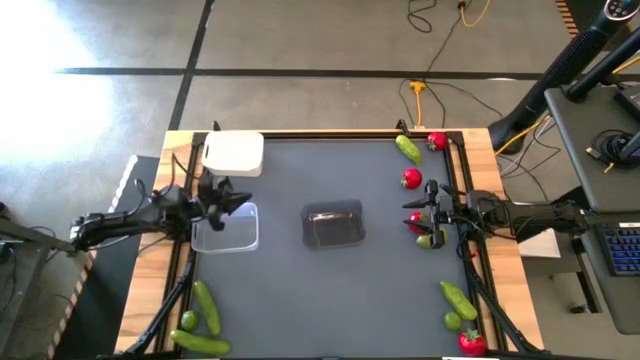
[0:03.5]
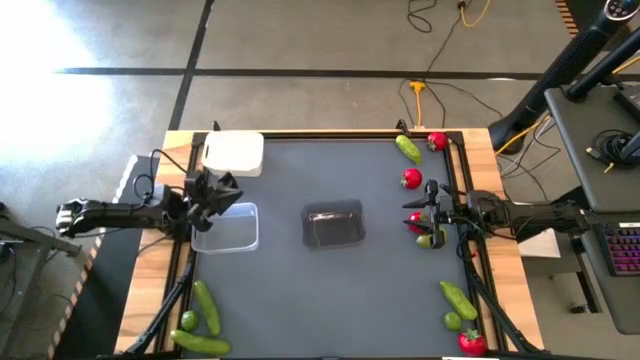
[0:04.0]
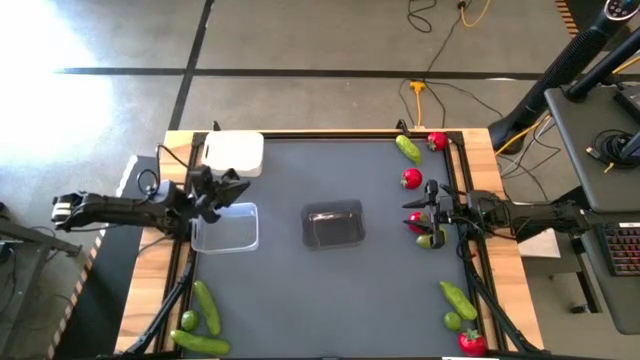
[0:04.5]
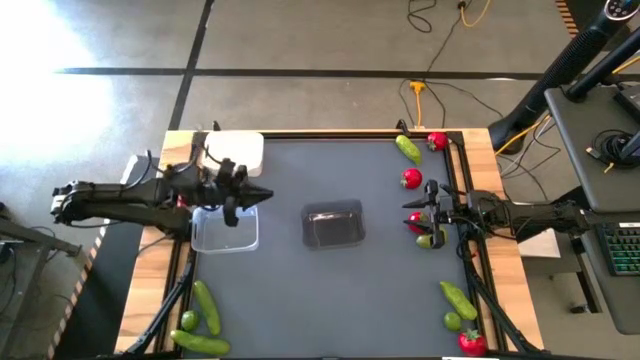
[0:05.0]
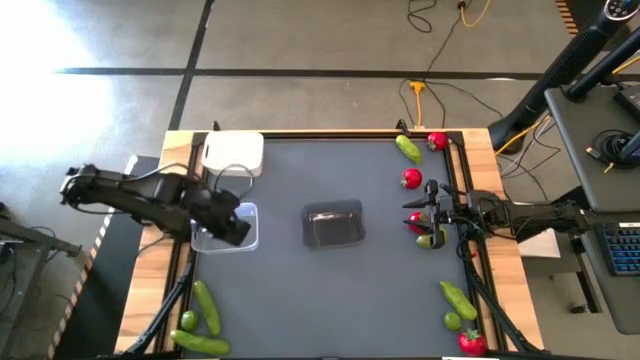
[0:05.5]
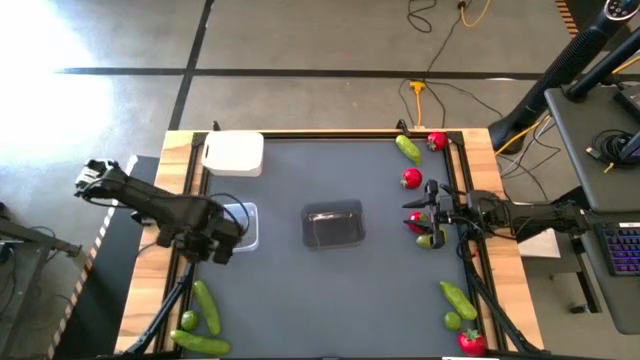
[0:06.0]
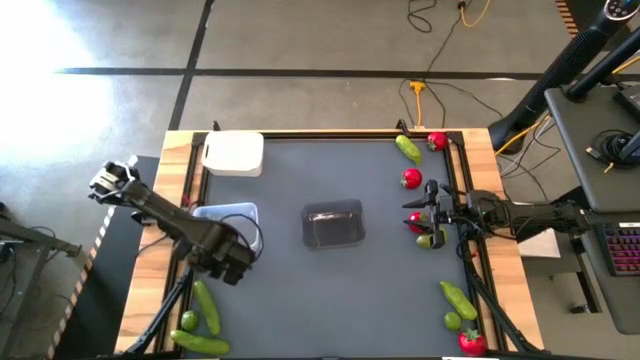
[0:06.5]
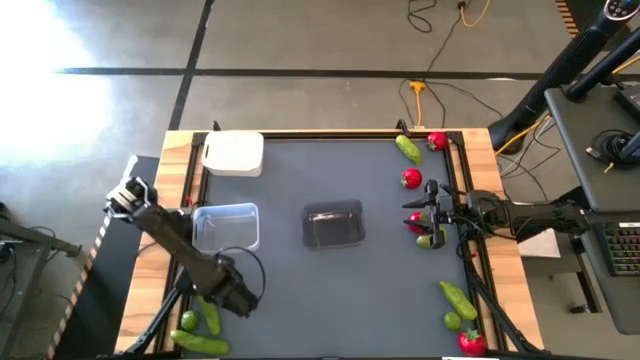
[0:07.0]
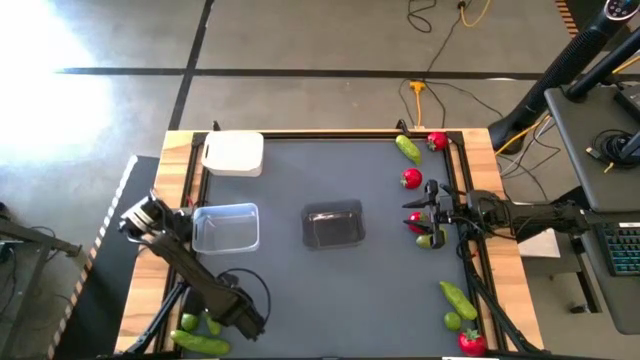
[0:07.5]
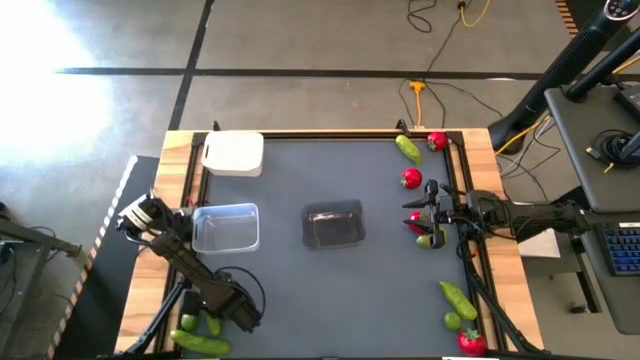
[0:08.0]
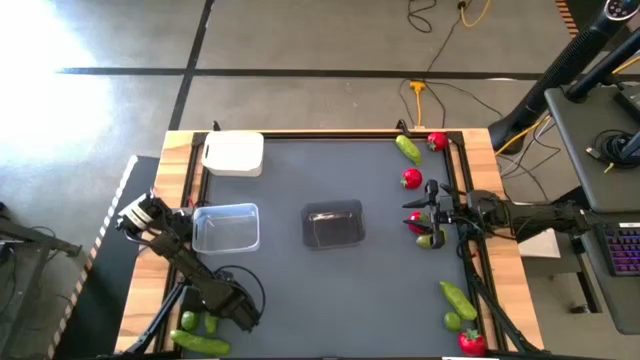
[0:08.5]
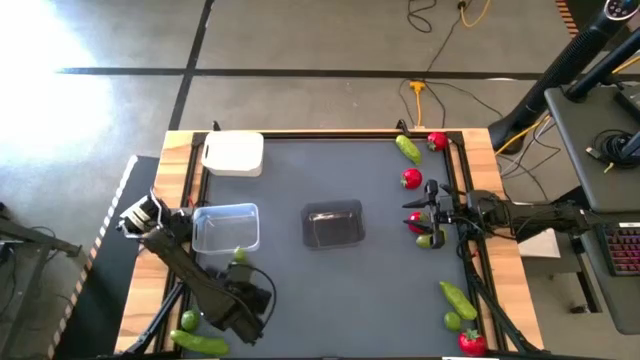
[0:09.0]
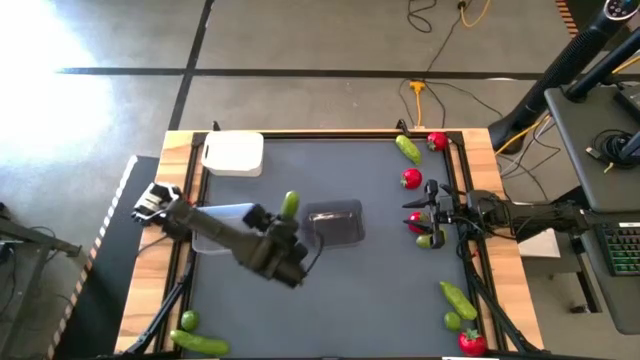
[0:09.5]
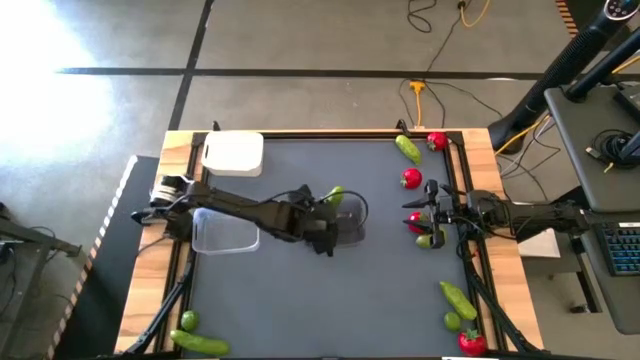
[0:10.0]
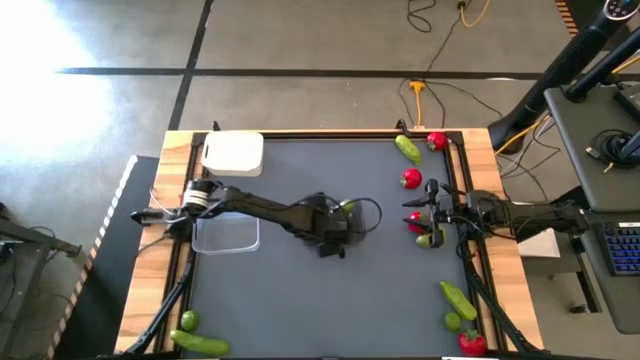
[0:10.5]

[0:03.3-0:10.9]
Task: Sort produce into baskets
Put the green cucumber into the black bin

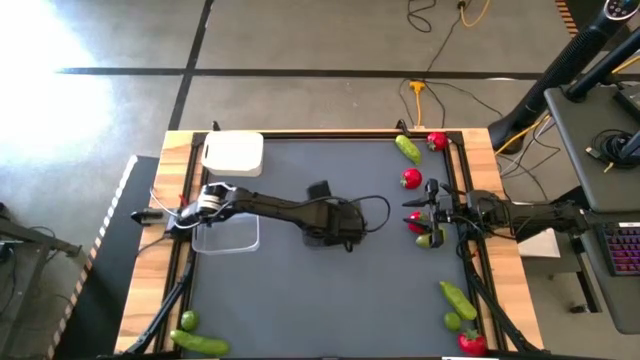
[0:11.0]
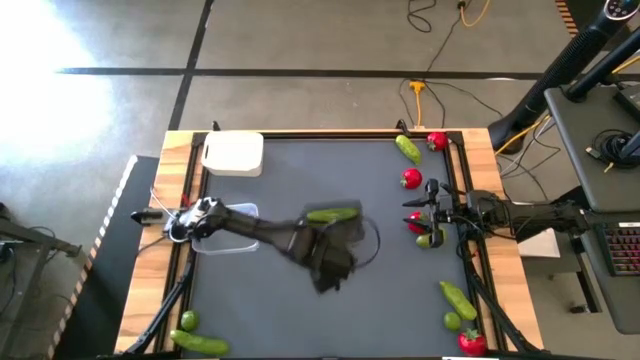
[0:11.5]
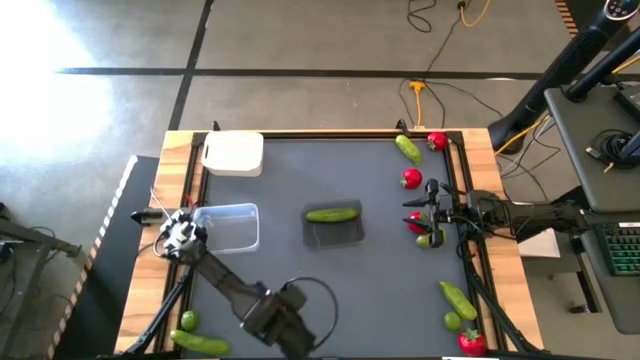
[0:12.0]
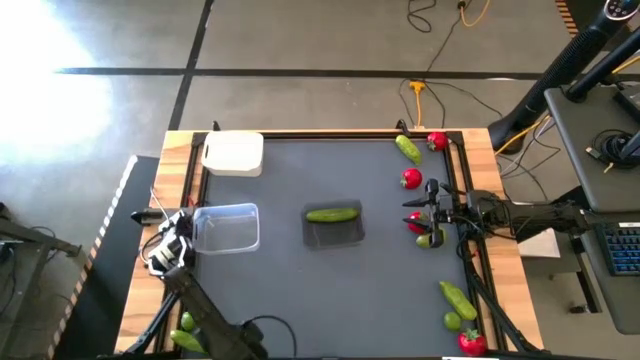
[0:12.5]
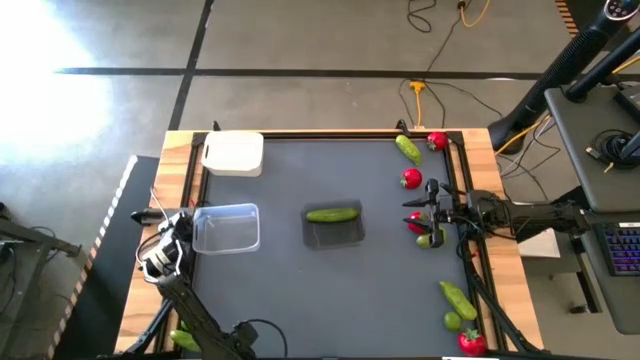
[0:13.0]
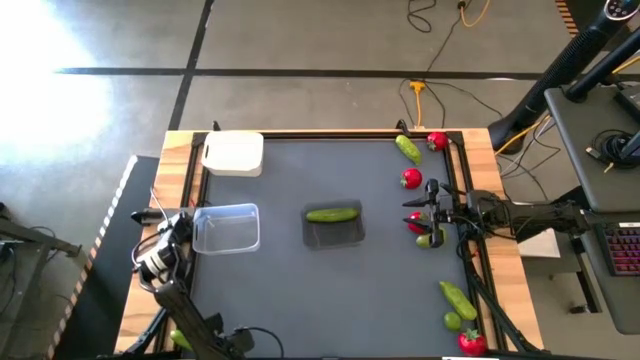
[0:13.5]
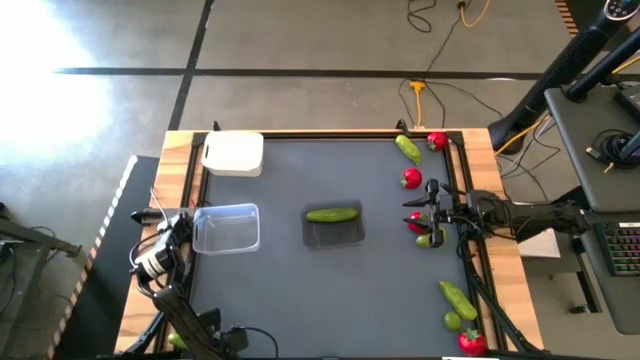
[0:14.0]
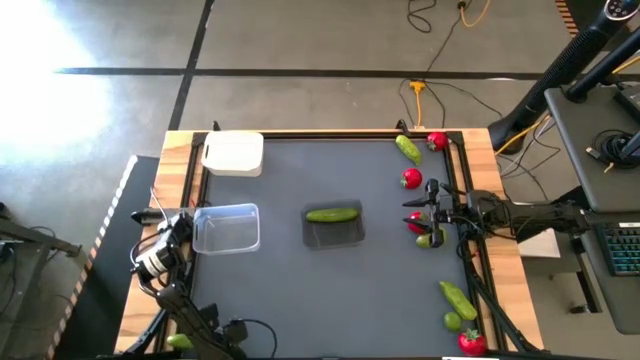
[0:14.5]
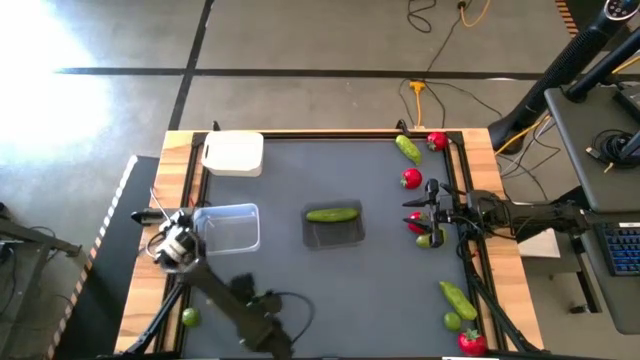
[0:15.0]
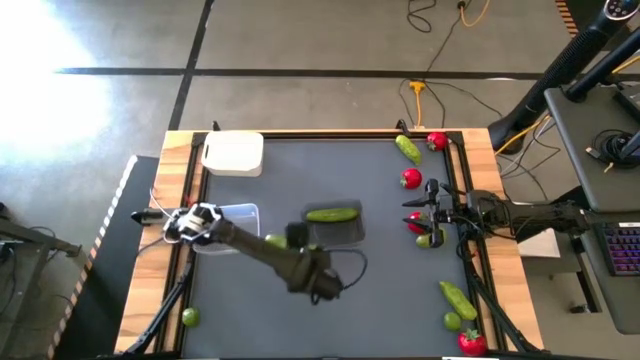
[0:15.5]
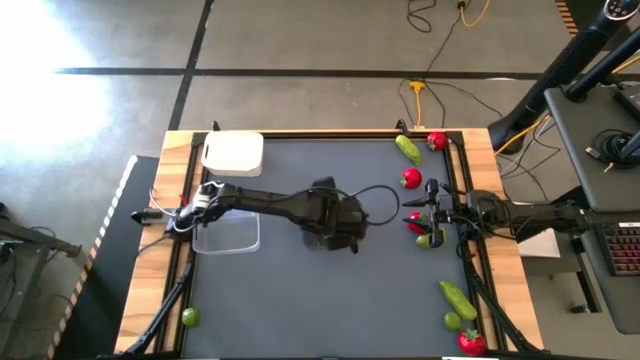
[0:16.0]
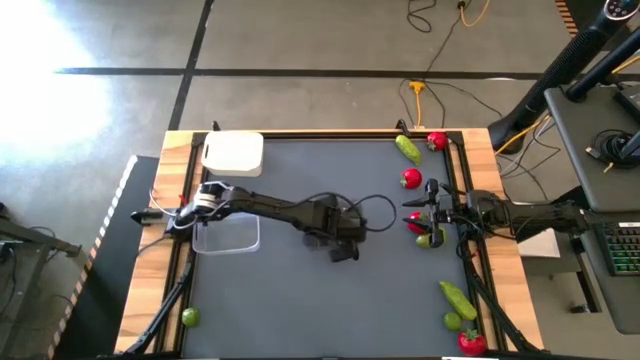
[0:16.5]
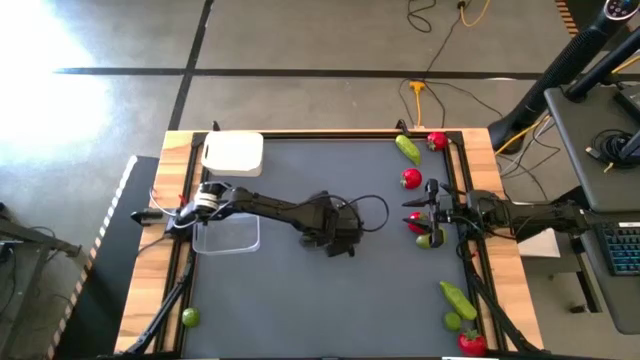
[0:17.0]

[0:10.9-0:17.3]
Put the green cucumber into the black bin

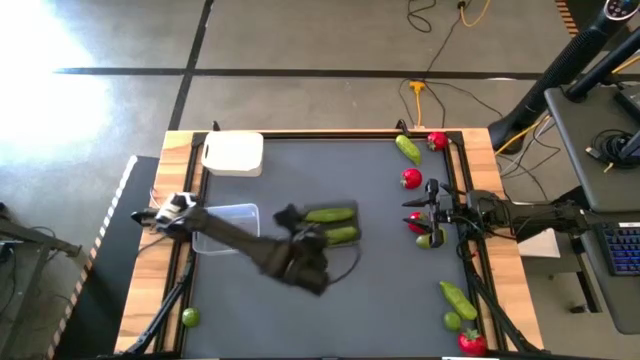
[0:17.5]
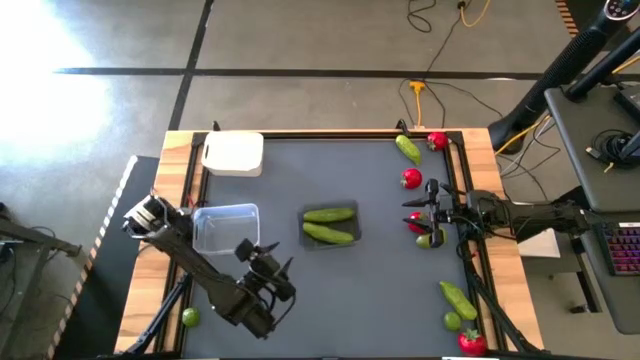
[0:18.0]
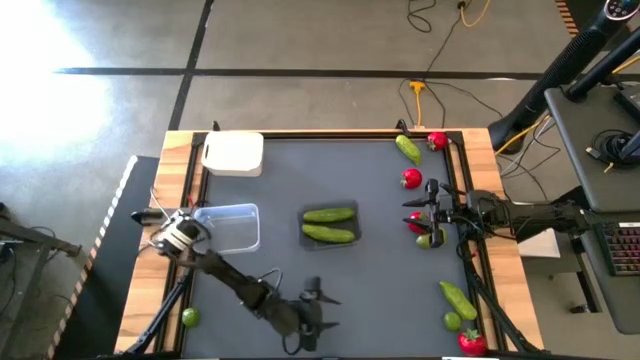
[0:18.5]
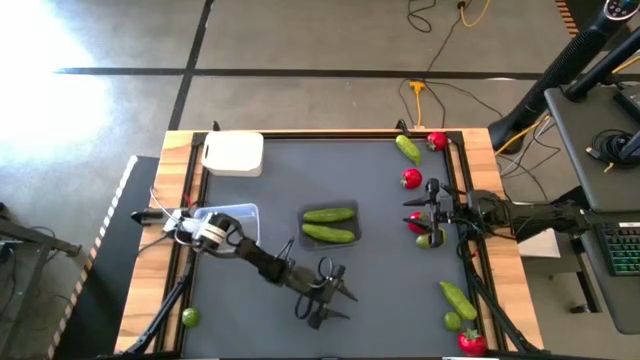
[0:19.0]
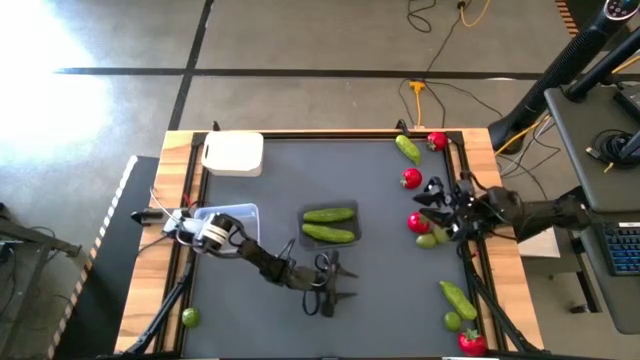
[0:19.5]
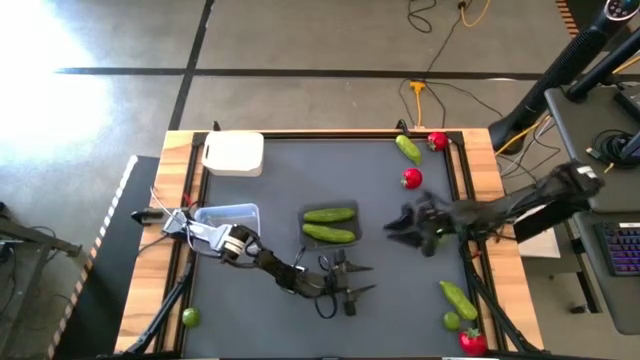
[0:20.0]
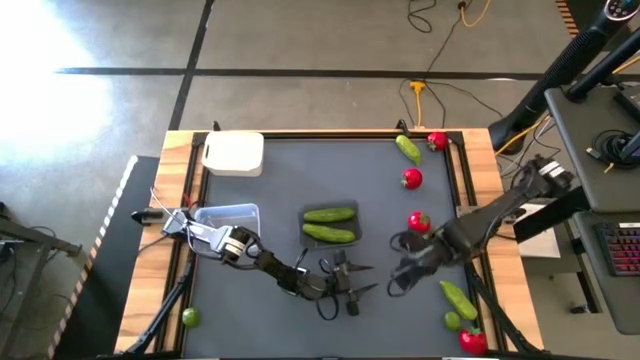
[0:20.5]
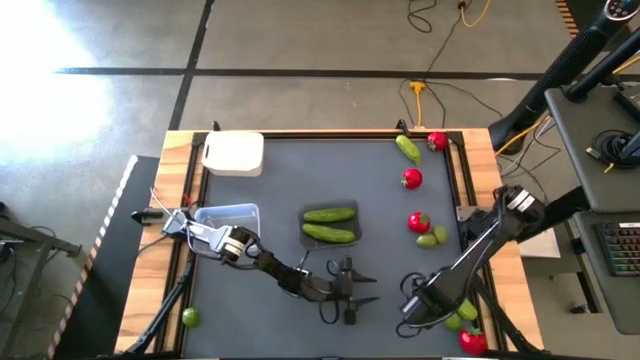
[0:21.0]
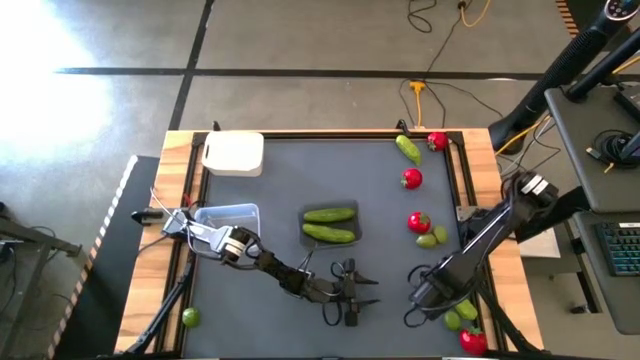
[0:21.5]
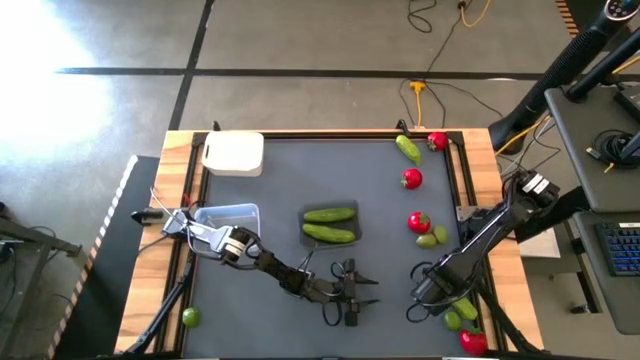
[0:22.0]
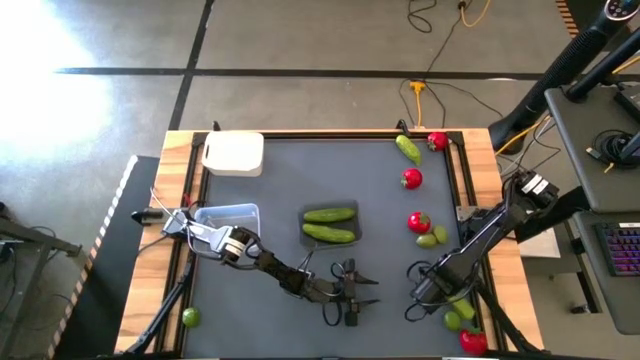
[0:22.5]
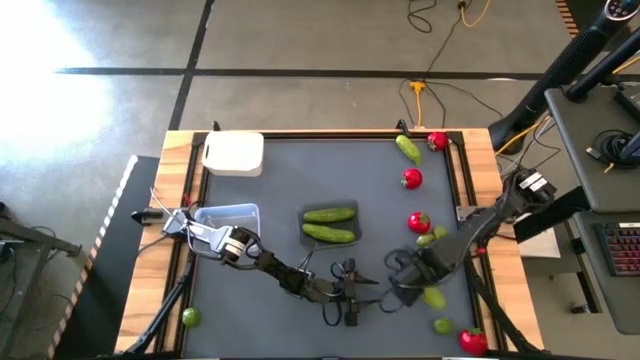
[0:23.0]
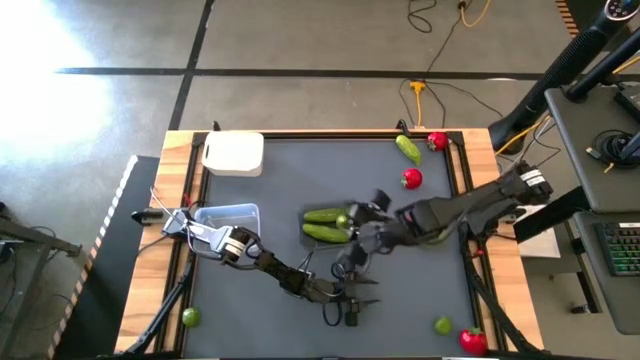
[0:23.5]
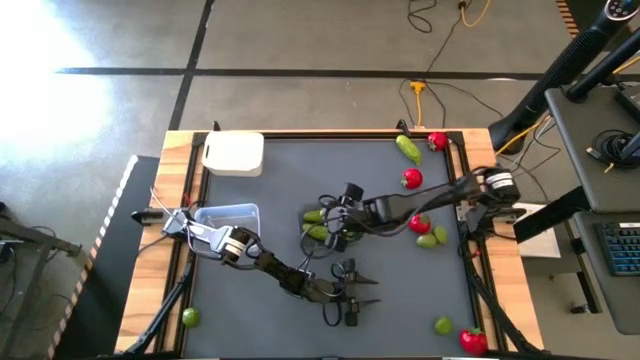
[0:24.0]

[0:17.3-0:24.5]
Put the green cucumber into the black bin
